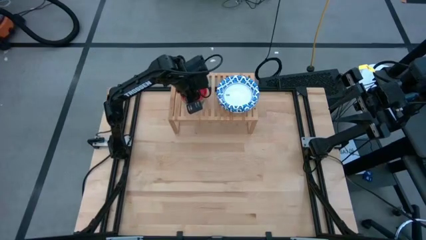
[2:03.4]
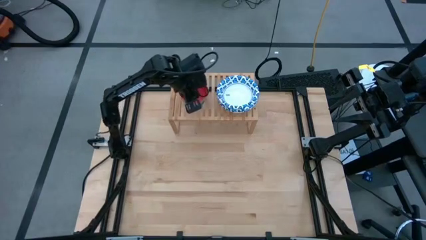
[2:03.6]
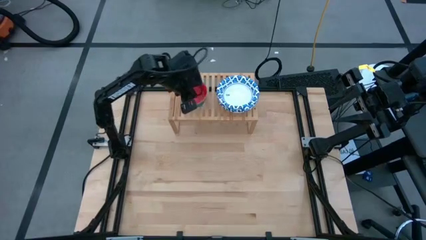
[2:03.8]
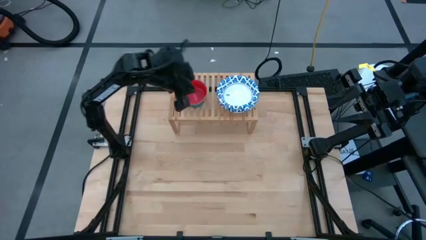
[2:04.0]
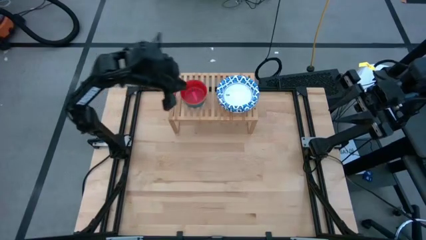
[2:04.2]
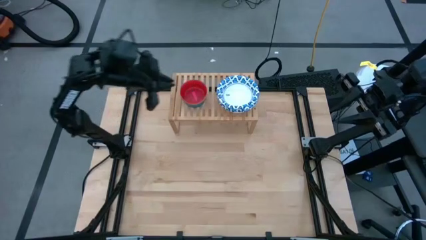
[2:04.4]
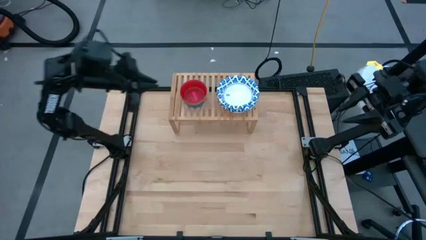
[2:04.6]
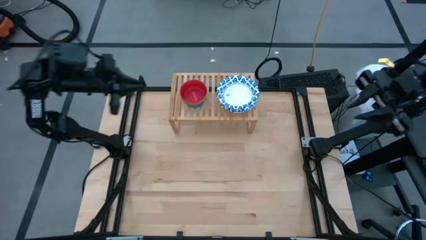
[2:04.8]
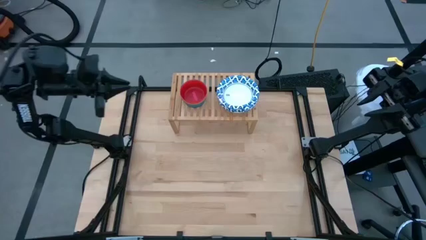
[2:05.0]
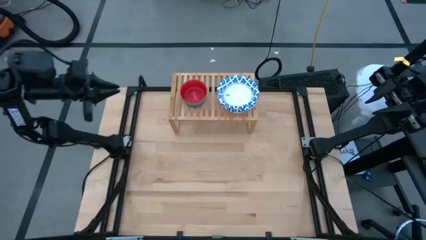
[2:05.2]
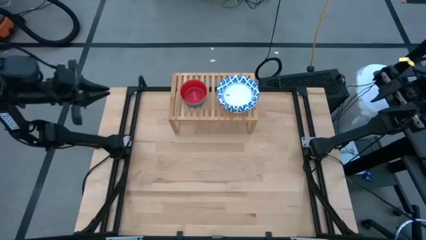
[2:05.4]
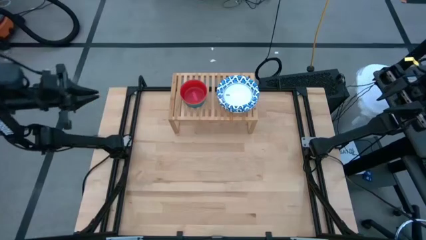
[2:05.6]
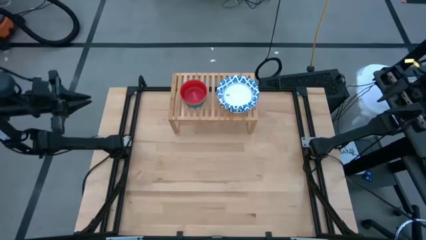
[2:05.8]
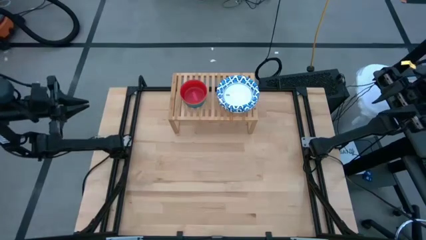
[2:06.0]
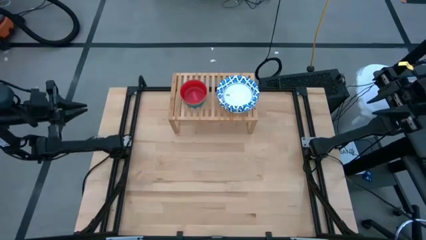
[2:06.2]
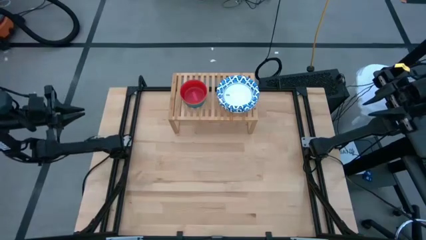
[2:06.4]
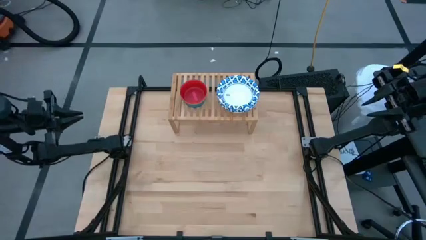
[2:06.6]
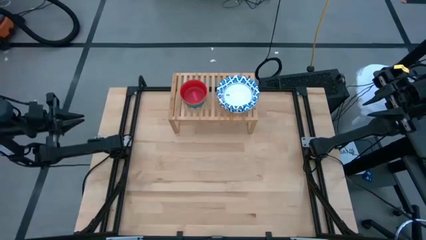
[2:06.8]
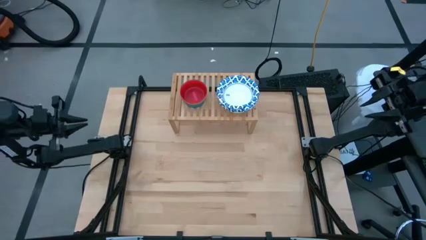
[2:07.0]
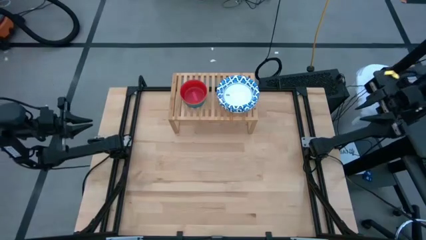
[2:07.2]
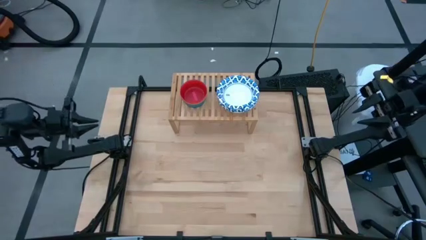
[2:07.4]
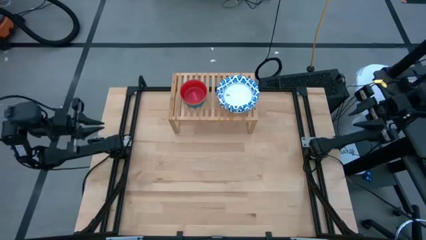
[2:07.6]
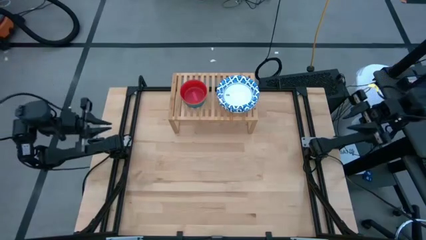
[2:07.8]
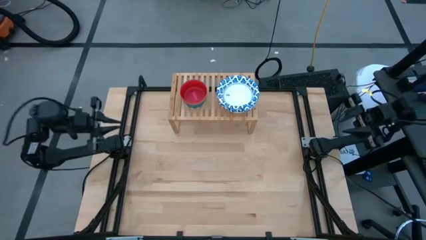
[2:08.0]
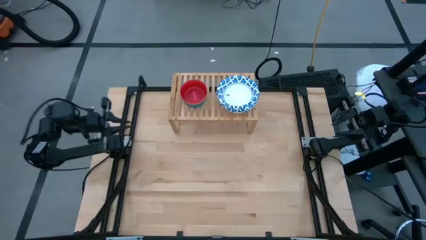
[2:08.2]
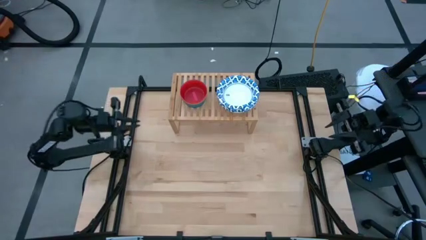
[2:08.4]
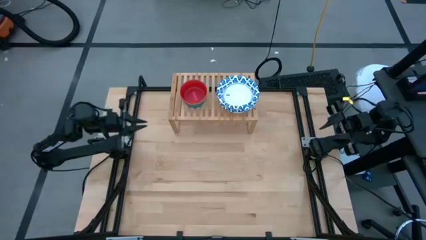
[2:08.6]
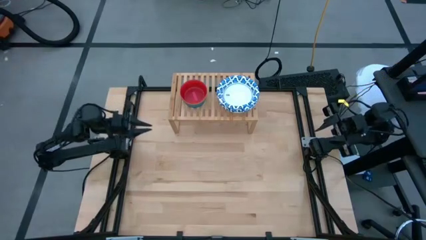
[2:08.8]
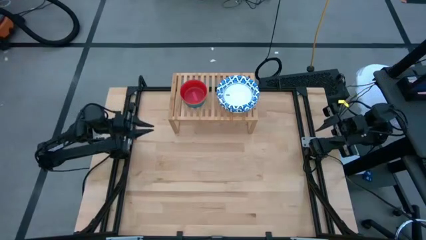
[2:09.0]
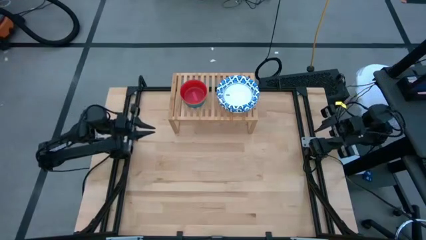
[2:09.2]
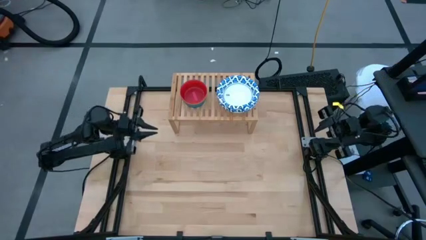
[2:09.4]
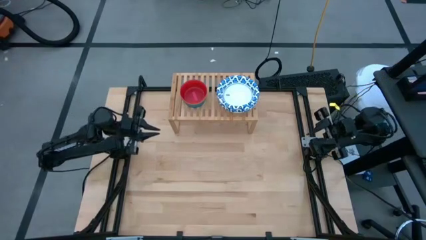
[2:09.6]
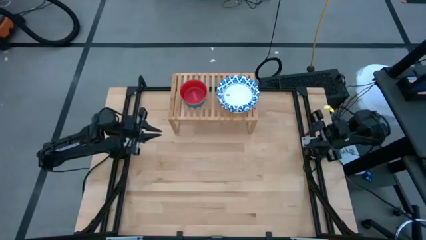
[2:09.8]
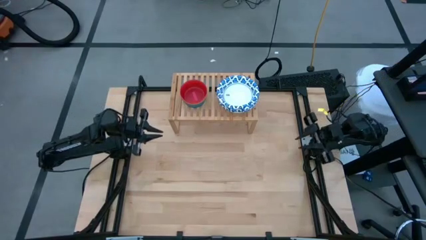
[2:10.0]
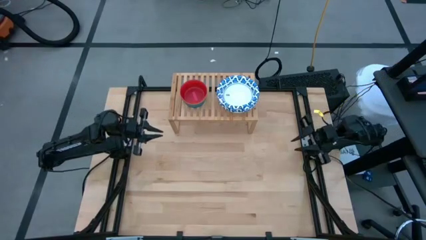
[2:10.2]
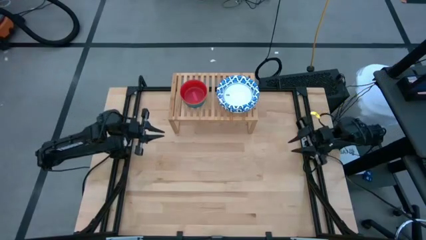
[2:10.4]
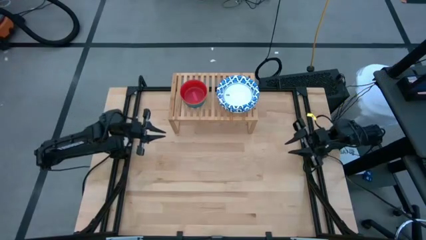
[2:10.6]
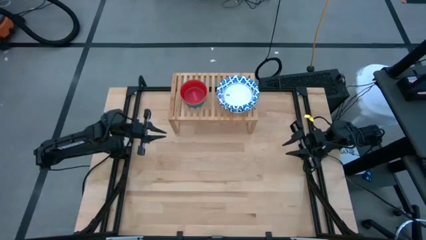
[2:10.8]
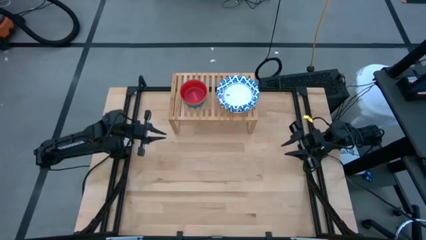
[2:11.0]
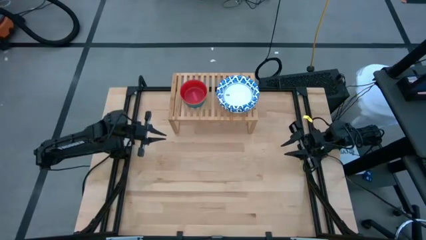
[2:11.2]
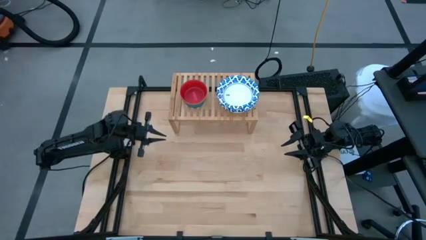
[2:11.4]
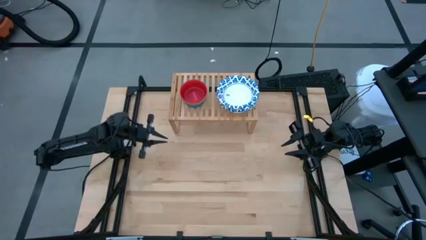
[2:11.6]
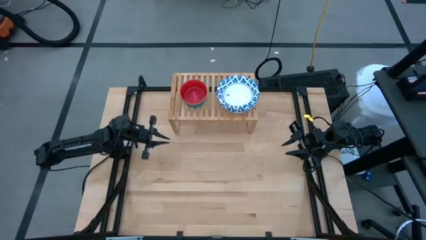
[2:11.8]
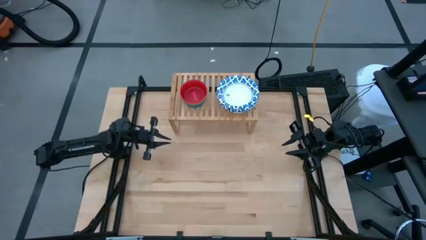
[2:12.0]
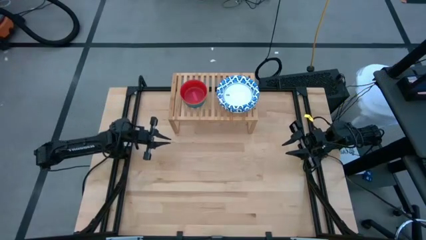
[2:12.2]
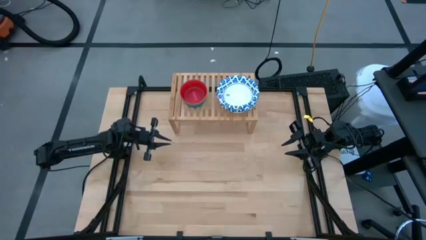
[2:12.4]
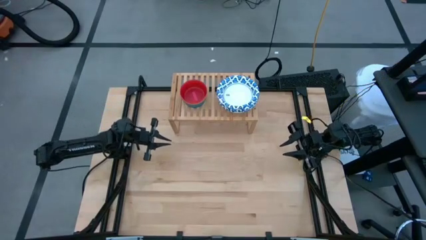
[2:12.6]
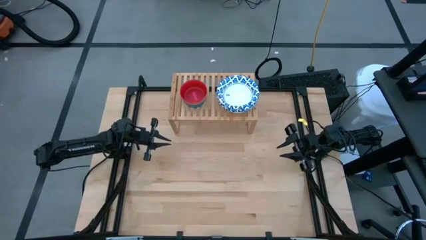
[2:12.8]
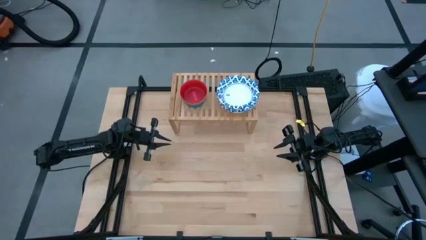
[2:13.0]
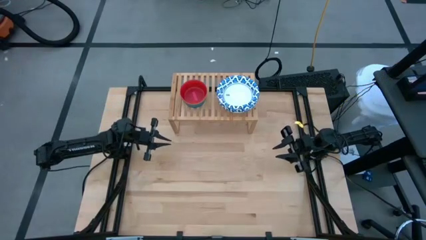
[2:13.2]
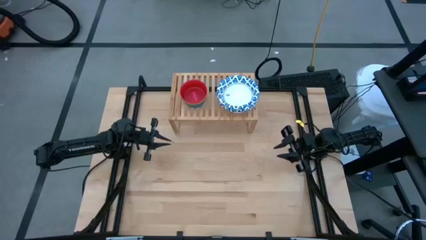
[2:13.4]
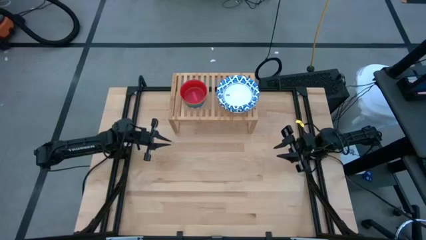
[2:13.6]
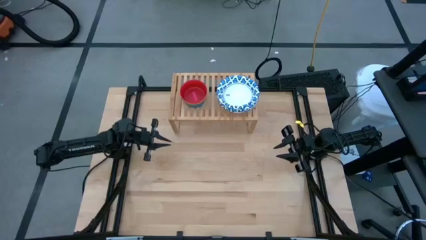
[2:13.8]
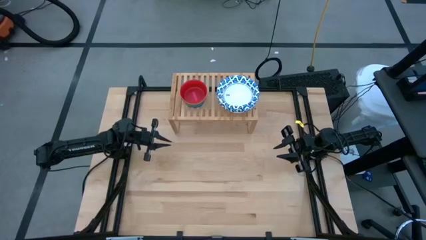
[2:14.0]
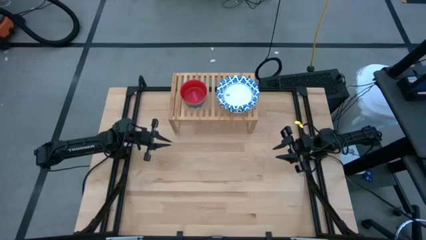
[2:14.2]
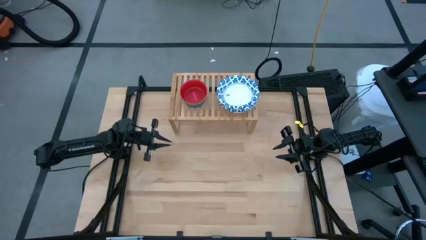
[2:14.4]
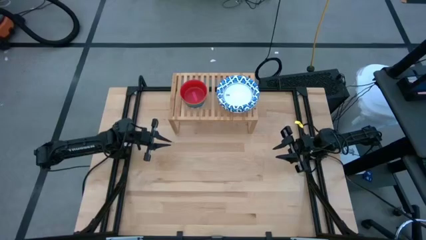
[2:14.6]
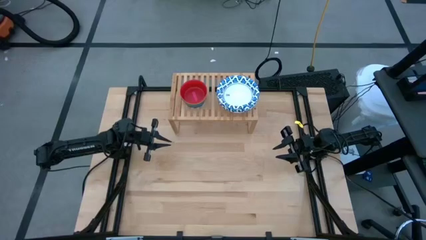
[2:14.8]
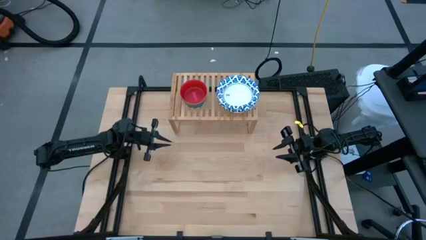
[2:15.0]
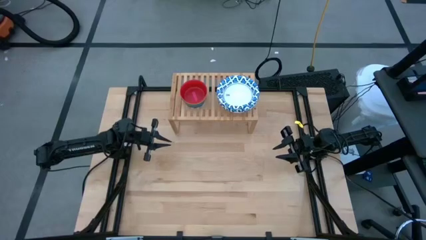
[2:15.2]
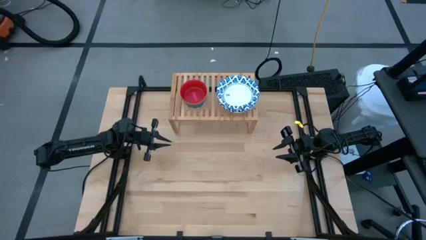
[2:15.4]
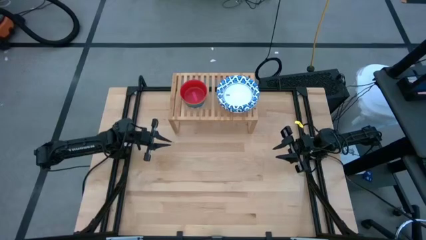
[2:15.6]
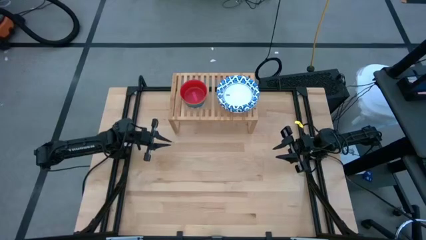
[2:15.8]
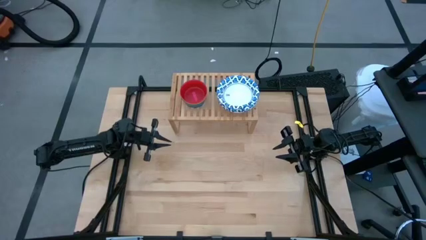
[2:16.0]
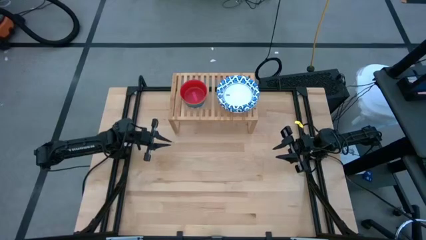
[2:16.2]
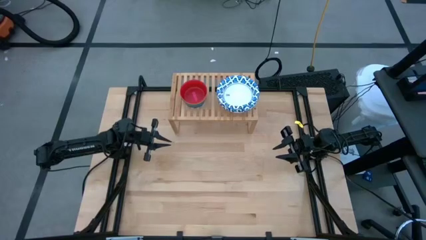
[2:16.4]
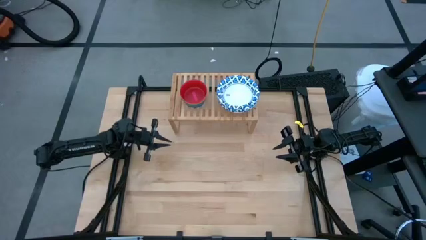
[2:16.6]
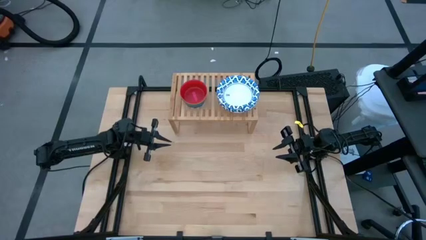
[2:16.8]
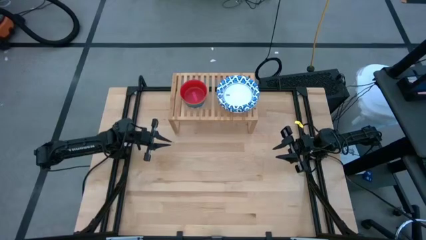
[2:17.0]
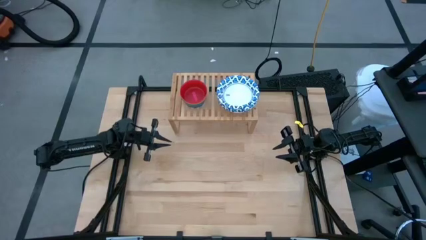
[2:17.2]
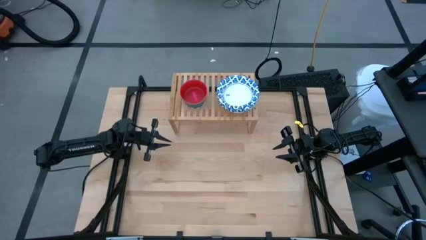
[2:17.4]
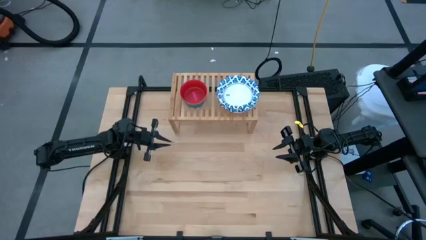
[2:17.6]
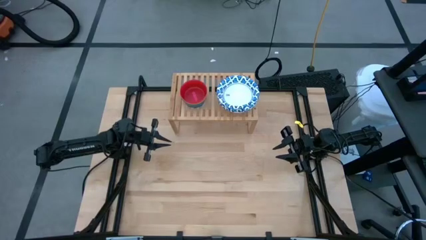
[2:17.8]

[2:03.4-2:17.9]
Task: Place and stack bowls onto a shelf
Return to Home Position
